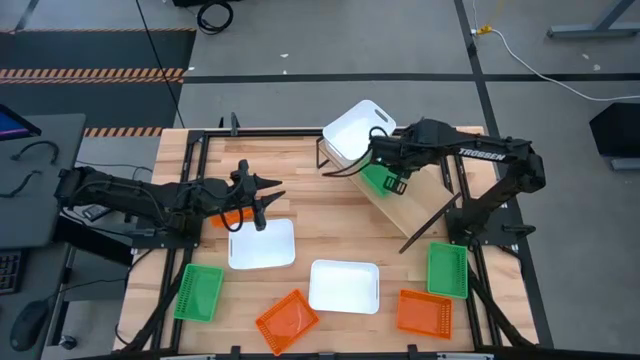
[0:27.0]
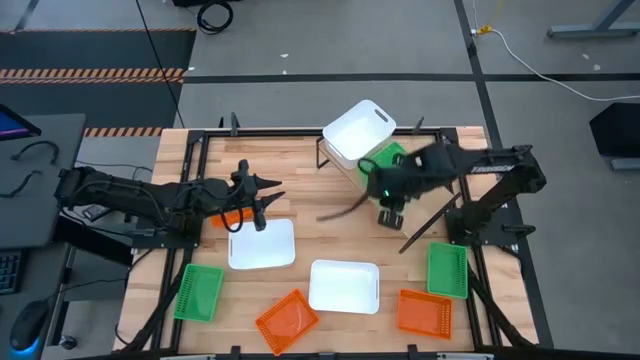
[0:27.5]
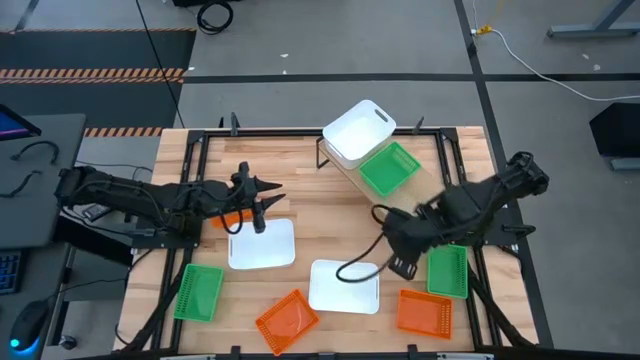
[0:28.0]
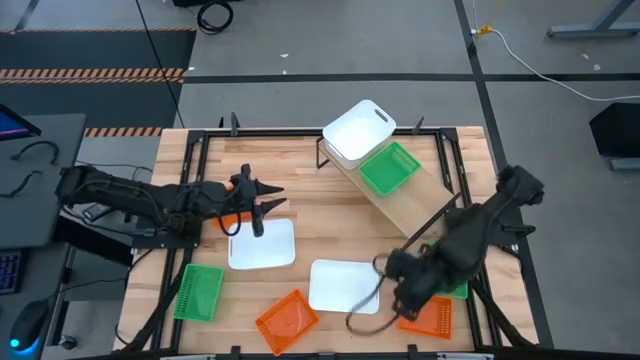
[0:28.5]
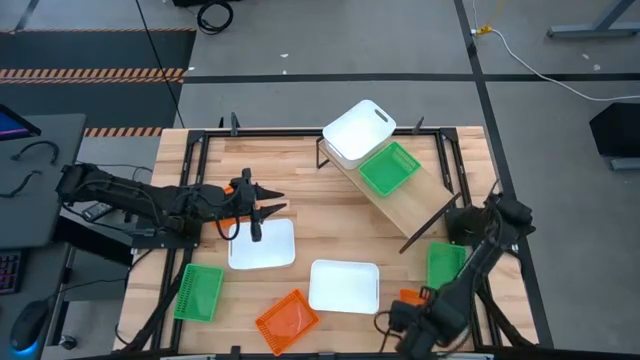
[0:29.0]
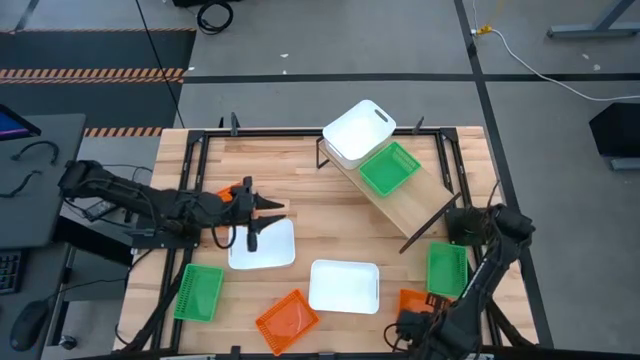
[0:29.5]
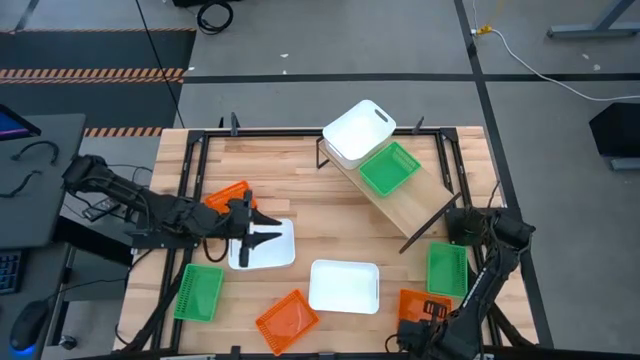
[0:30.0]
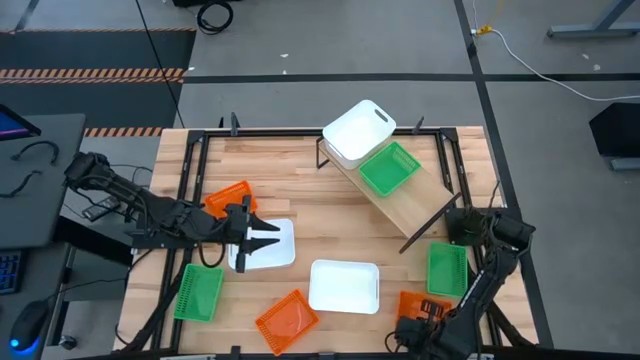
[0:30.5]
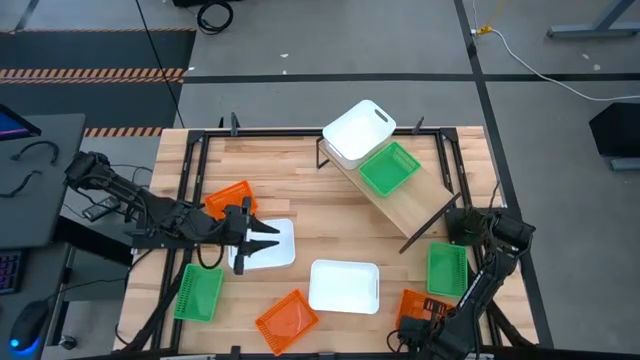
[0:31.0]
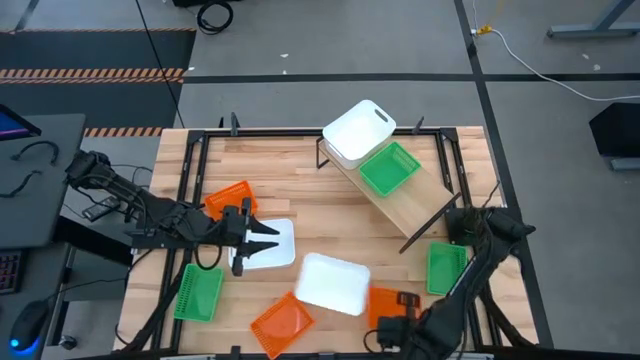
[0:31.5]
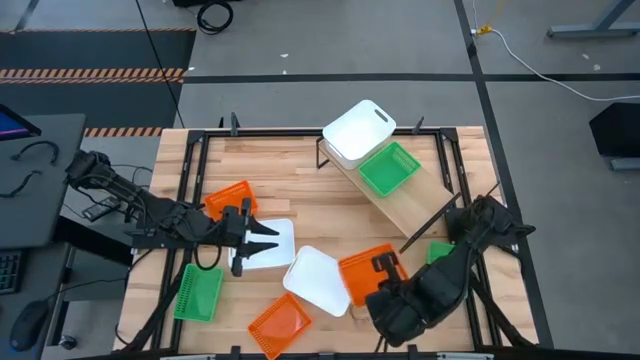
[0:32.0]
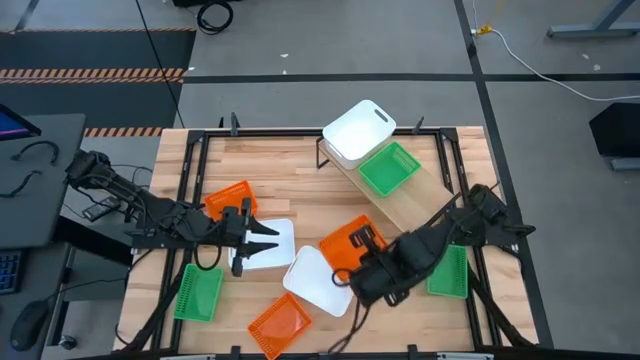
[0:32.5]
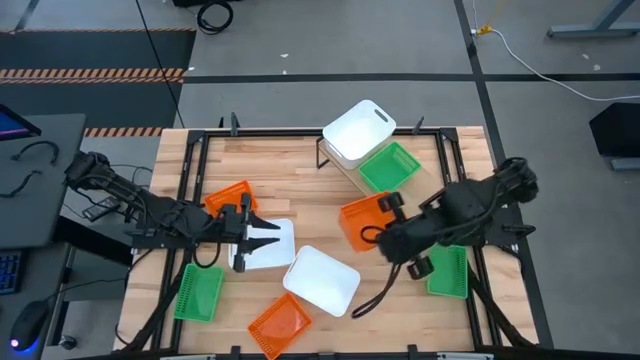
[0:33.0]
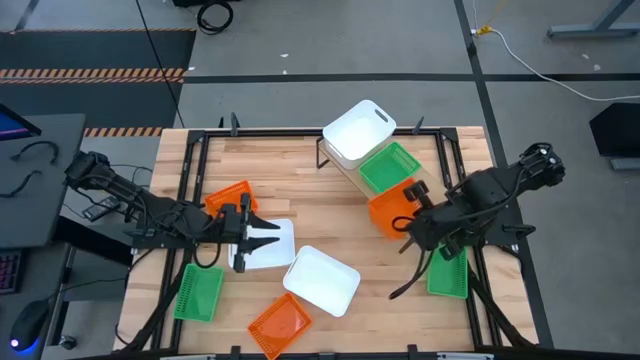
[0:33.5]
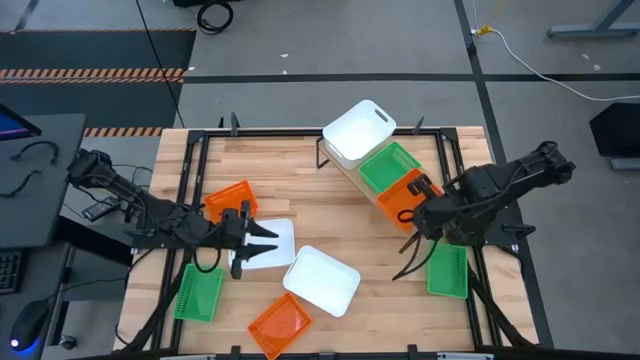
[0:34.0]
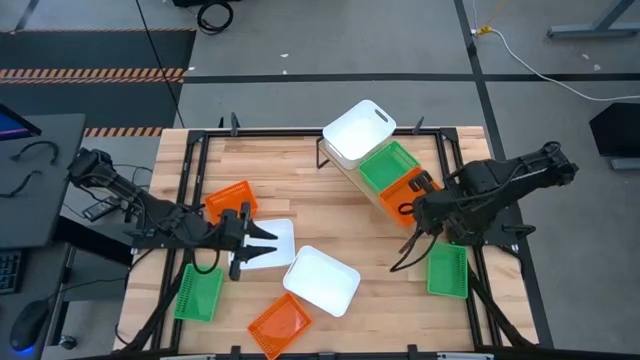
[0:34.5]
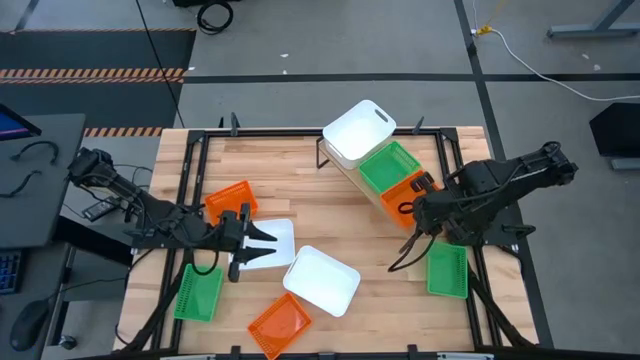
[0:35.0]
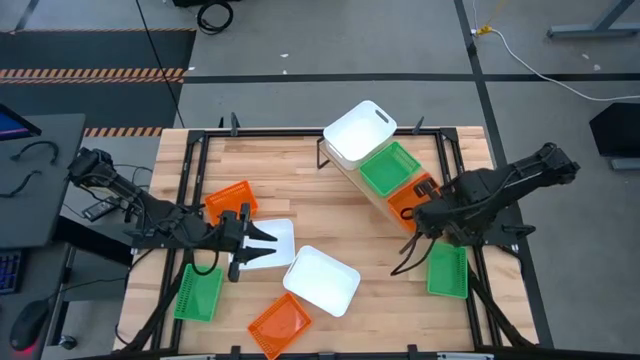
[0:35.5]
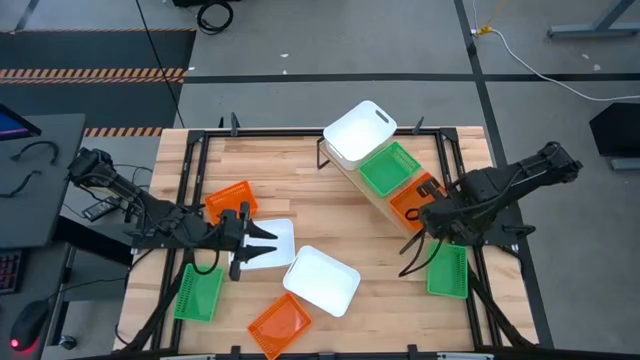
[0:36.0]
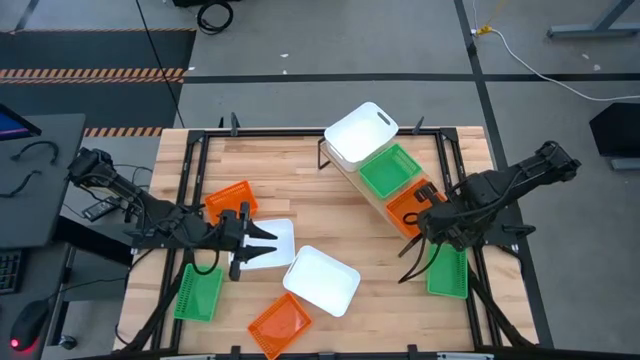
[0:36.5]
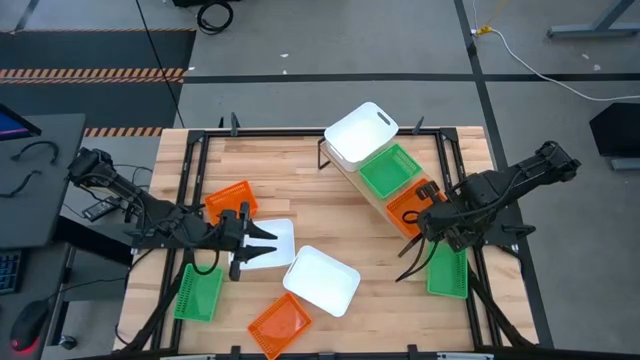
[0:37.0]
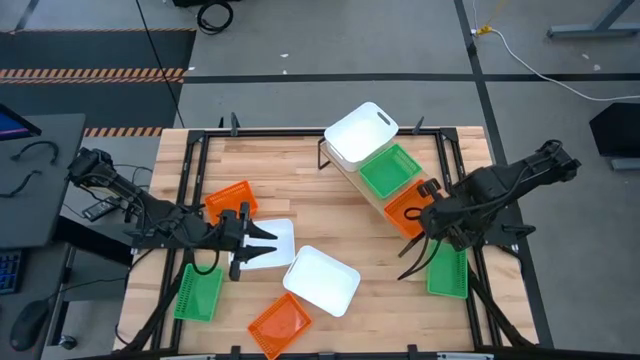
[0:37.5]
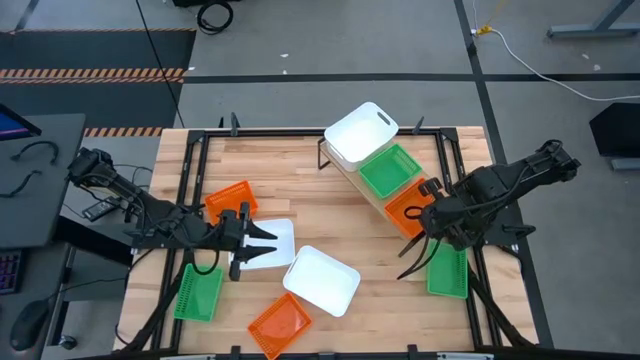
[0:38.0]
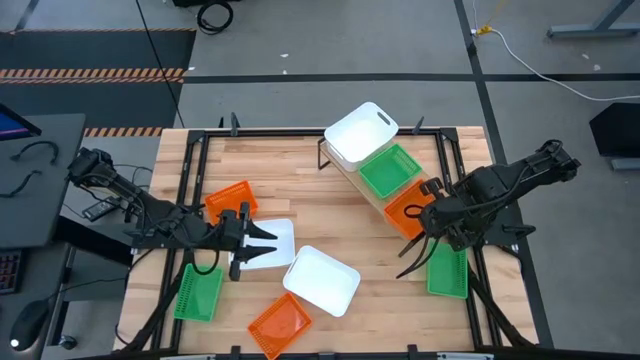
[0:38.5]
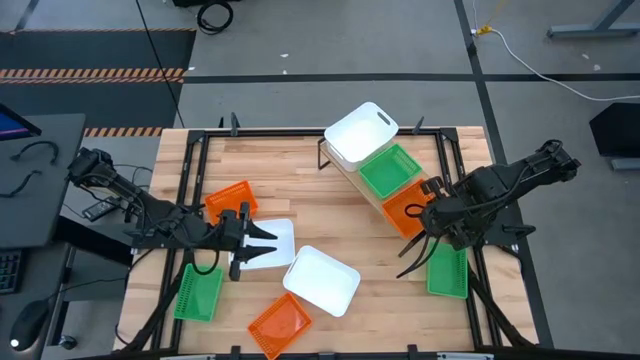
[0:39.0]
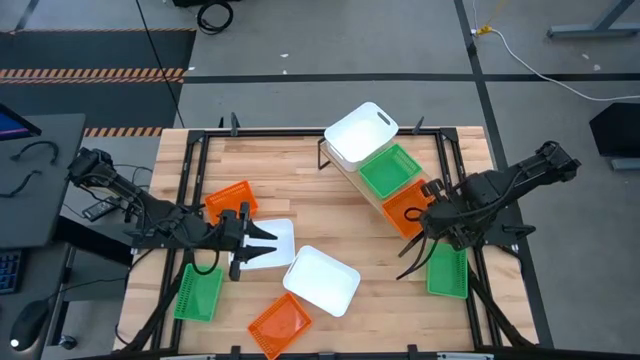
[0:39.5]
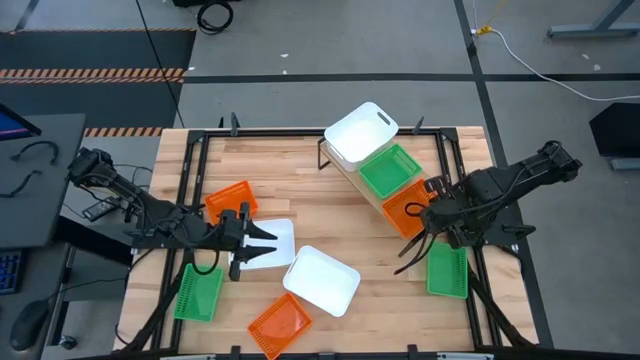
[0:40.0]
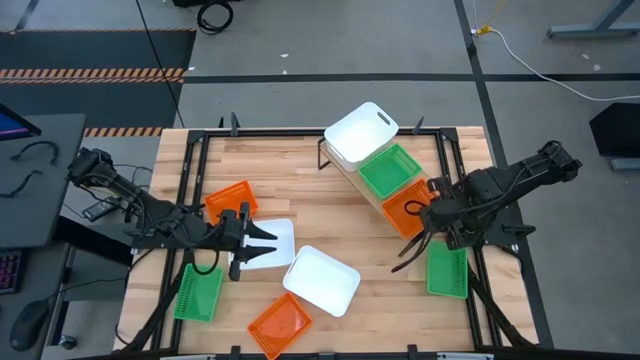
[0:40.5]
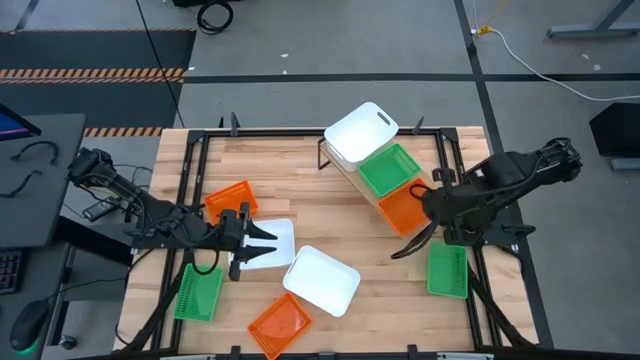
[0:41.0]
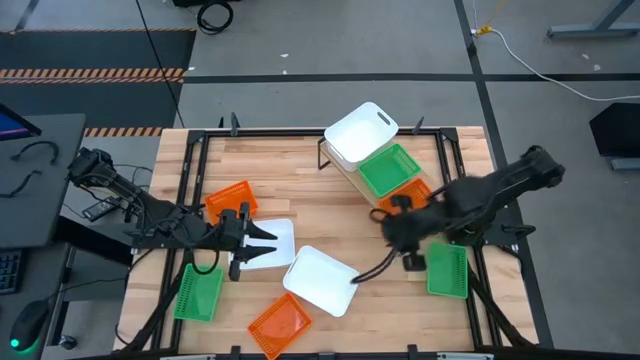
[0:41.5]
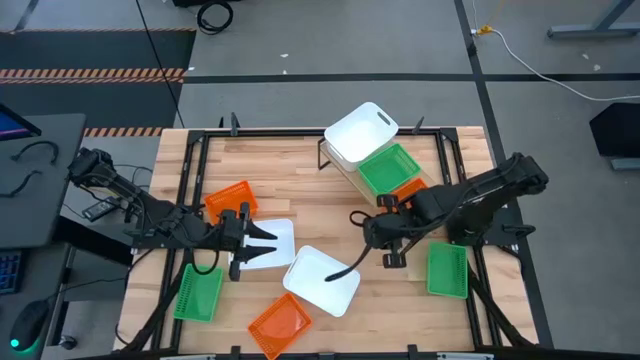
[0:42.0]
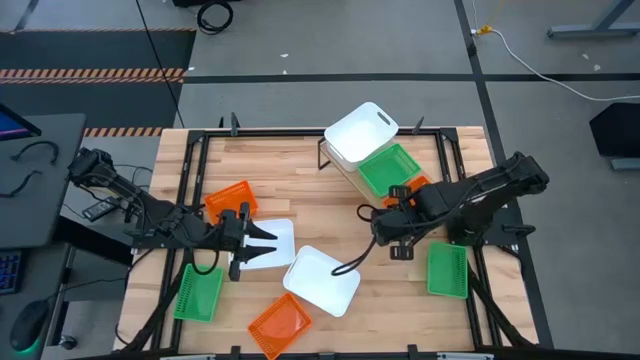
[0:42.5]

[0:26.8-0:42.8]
Task: Stack baskets on shelf by color
Put the bottom right orange bin on the shelf

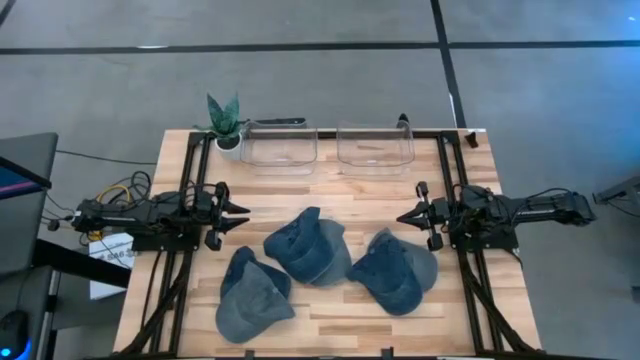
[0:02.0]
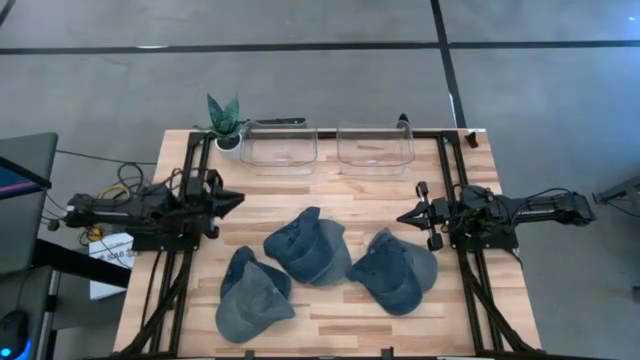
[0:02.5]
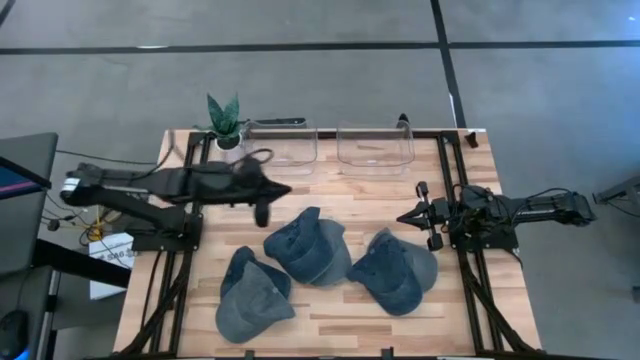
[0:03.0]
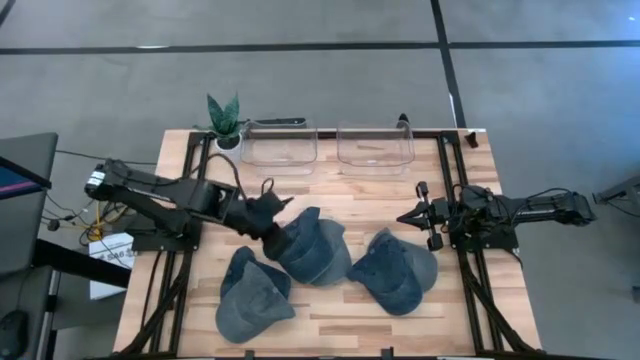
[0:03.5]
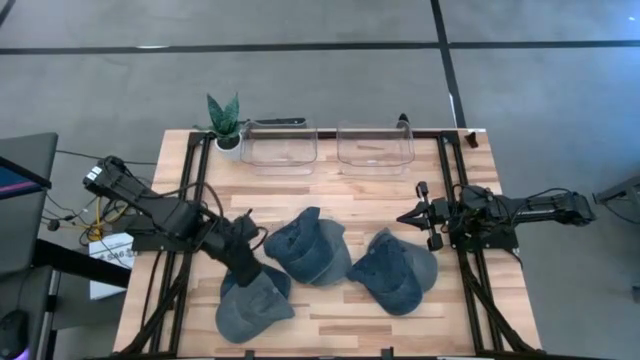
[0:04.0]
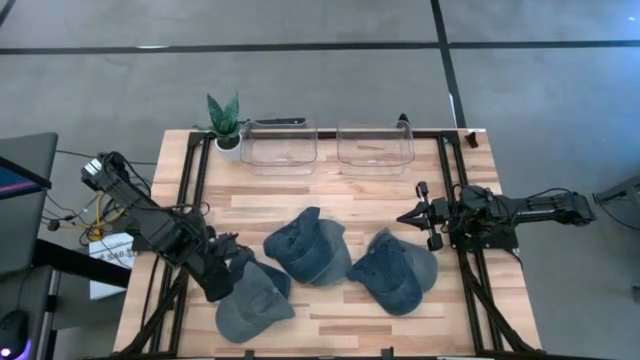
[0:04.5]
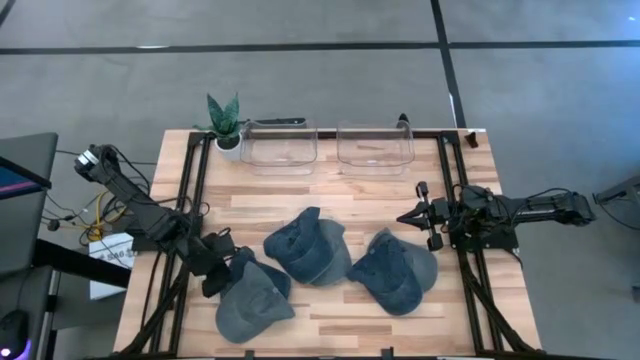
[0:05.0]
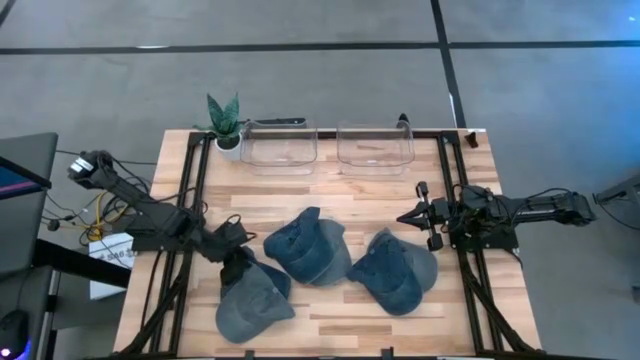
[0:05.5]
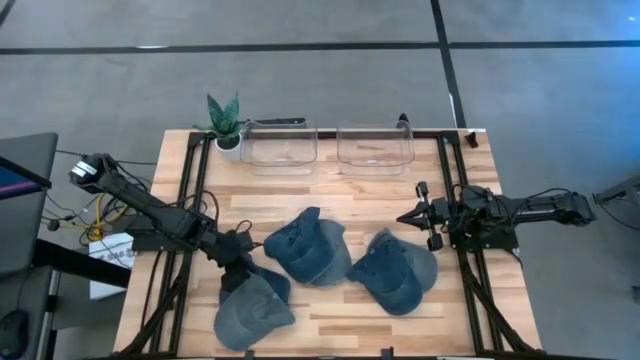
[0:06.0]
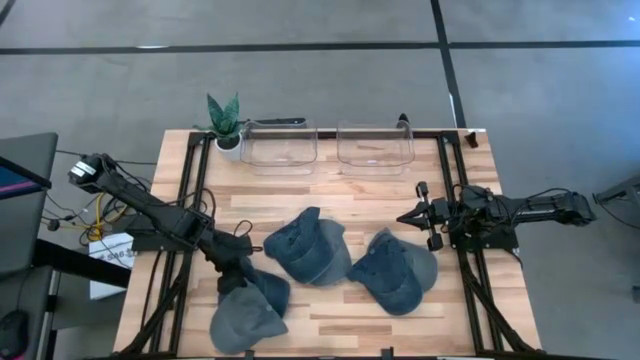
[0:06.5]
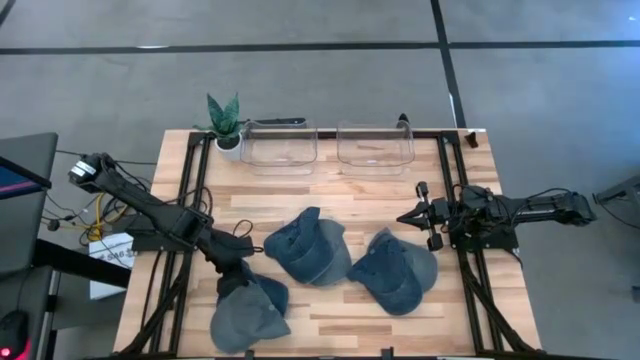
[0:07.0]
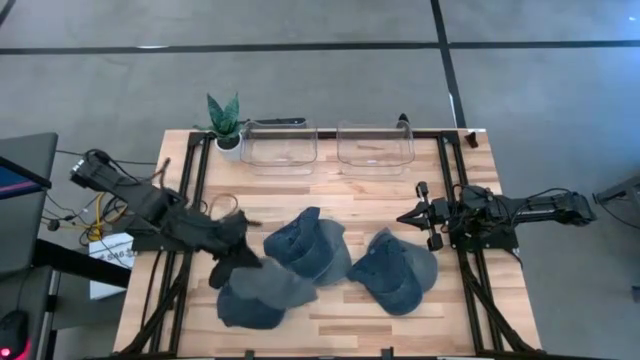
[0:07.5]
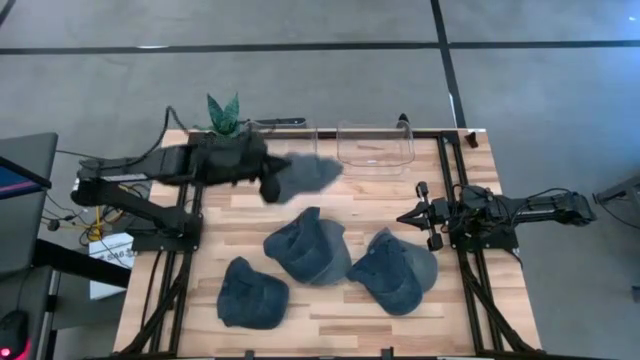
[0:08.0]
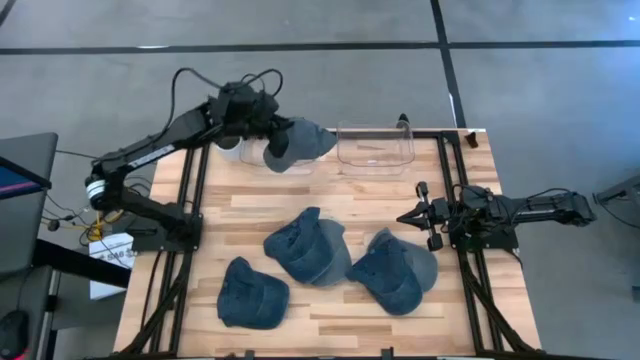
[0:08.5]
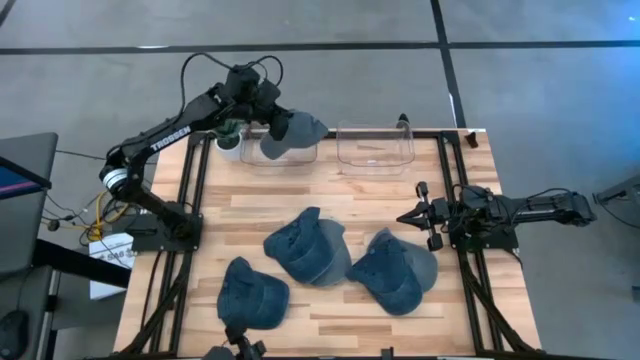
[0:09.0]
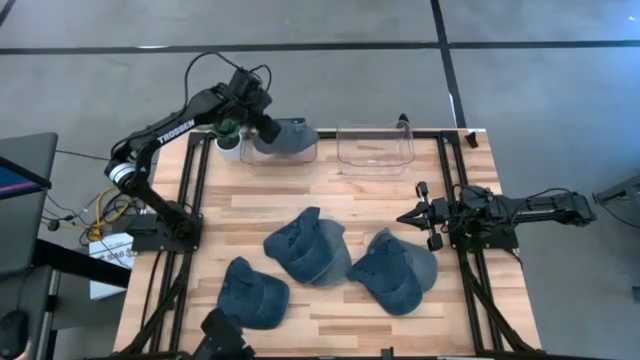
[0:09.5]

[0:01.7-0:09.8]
Task: Pick & Place hat
Put the bottom left gray cap into the left transparent bin
